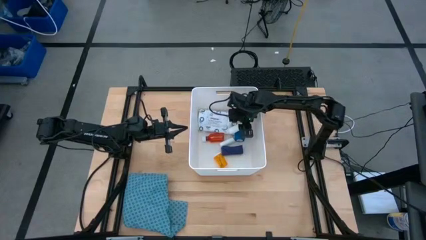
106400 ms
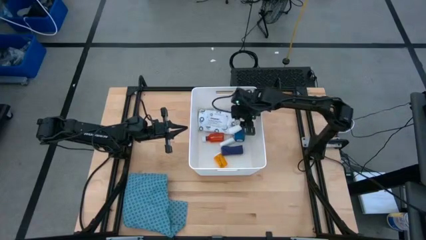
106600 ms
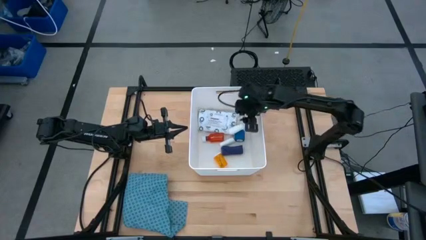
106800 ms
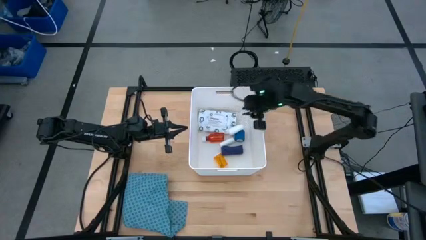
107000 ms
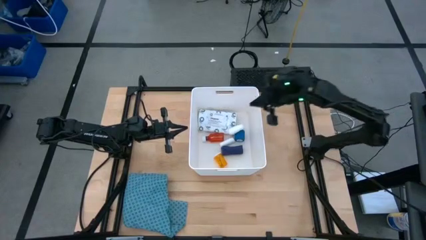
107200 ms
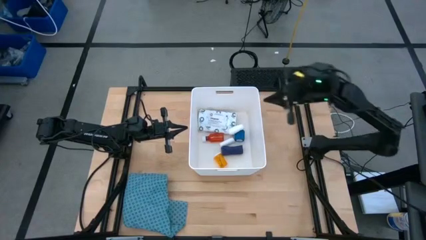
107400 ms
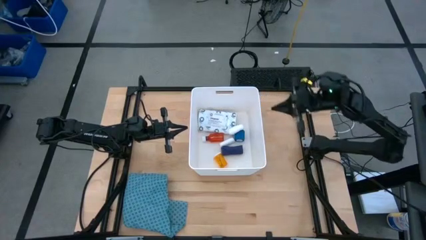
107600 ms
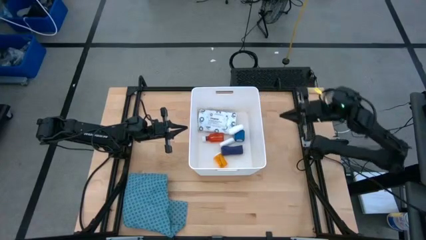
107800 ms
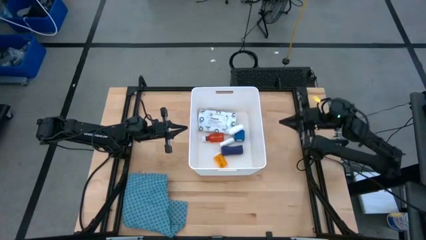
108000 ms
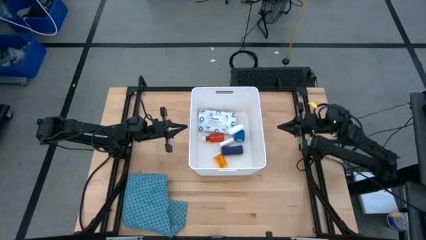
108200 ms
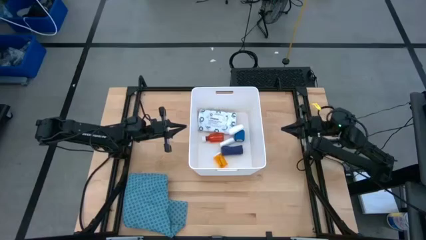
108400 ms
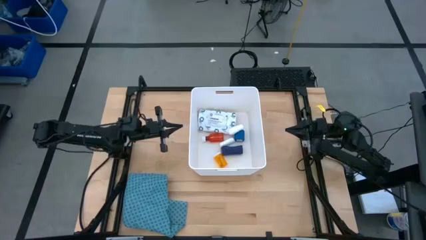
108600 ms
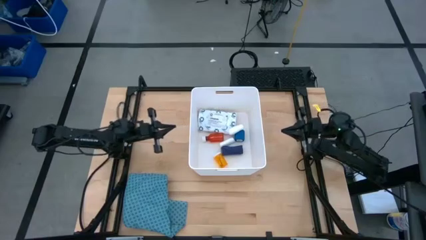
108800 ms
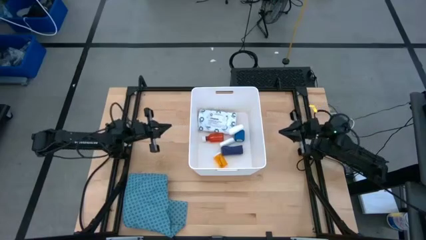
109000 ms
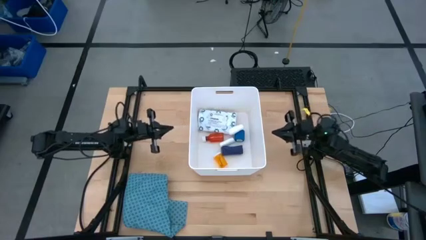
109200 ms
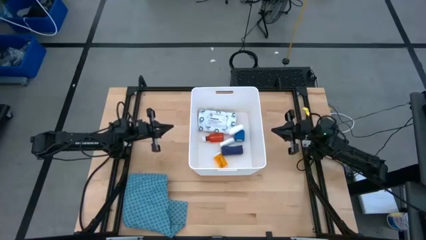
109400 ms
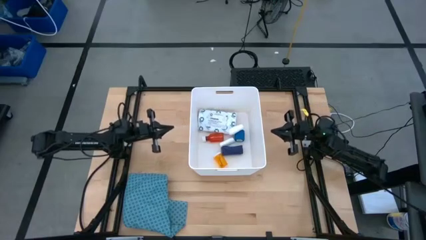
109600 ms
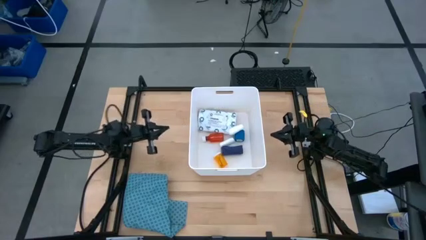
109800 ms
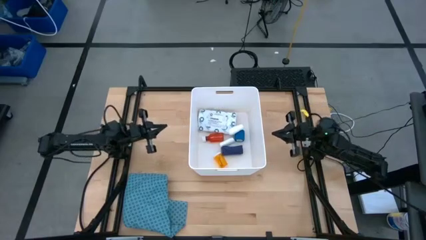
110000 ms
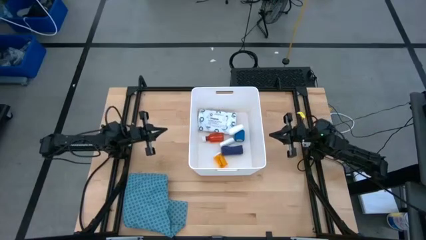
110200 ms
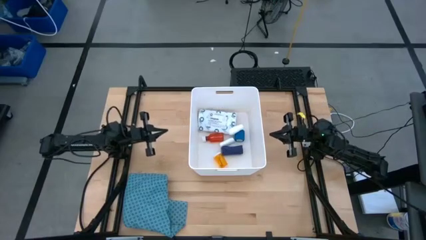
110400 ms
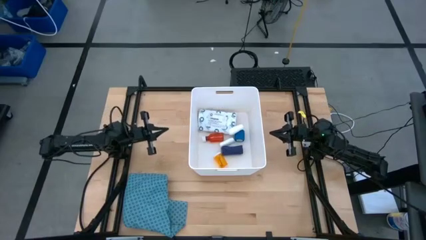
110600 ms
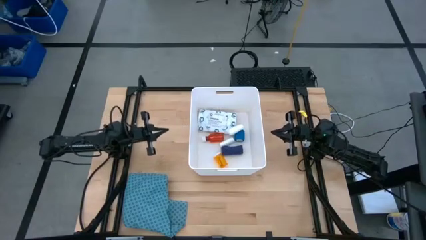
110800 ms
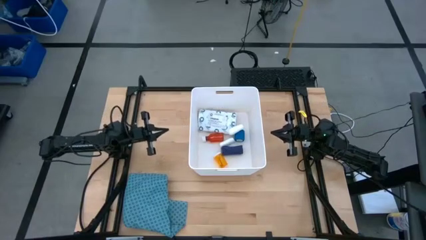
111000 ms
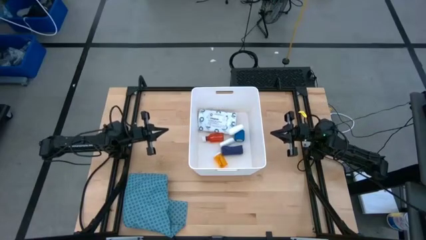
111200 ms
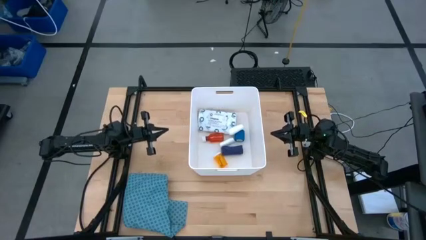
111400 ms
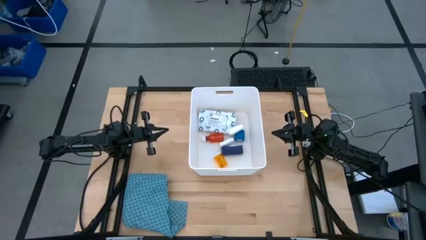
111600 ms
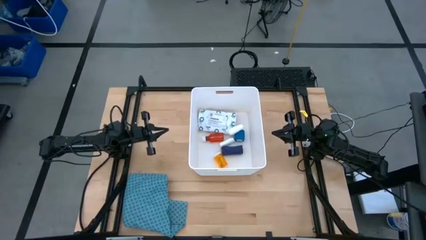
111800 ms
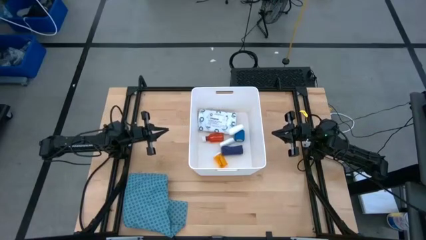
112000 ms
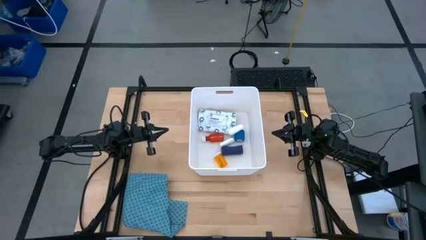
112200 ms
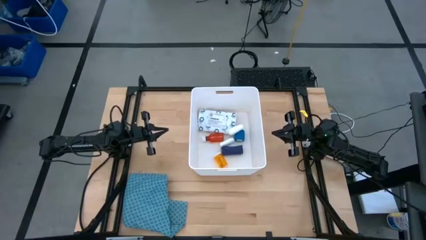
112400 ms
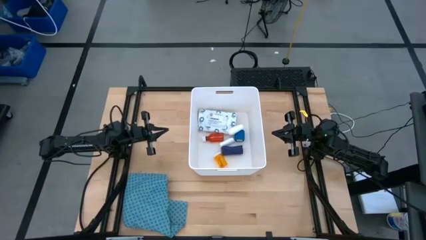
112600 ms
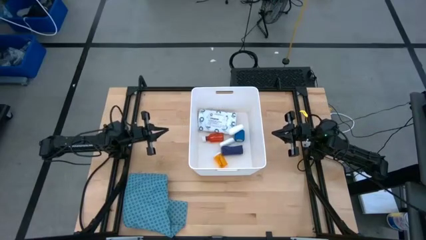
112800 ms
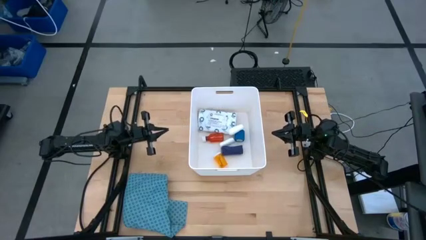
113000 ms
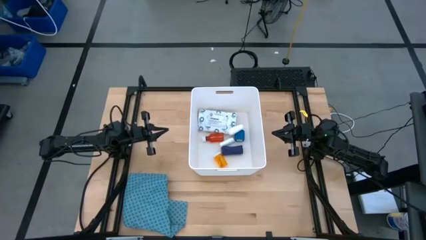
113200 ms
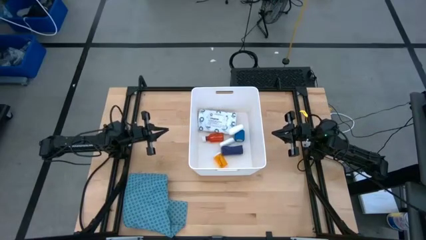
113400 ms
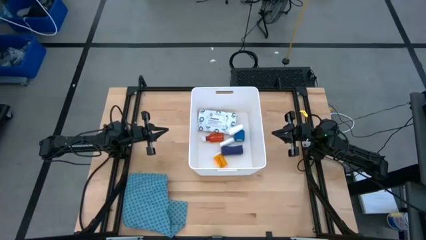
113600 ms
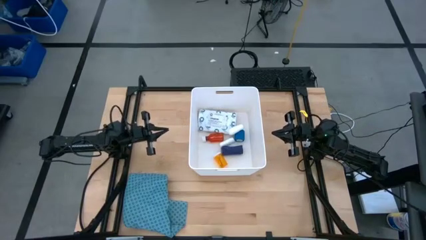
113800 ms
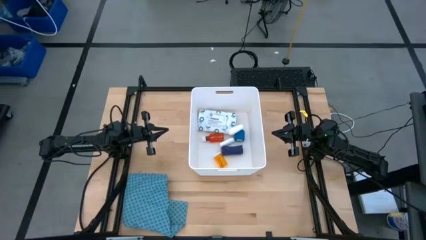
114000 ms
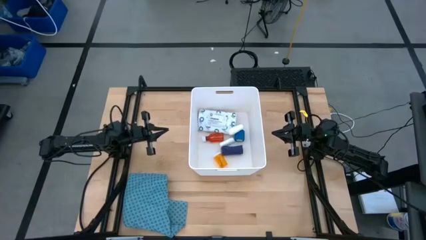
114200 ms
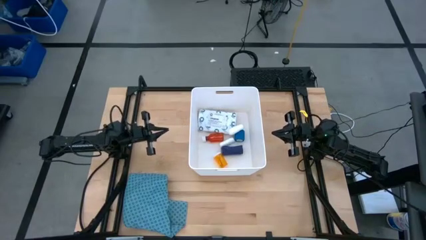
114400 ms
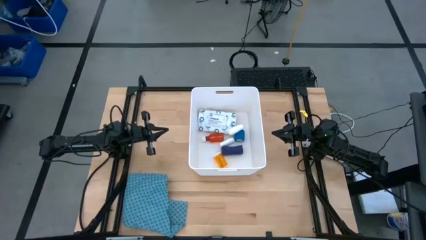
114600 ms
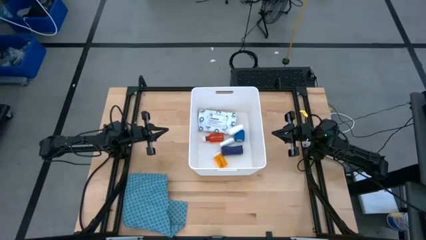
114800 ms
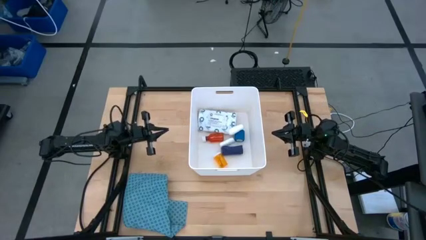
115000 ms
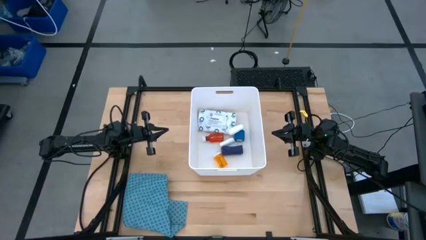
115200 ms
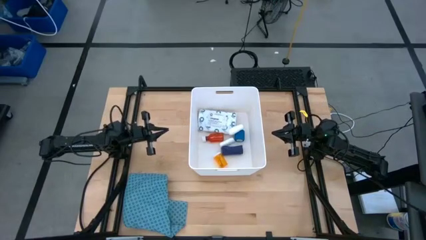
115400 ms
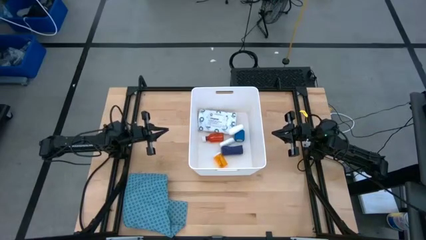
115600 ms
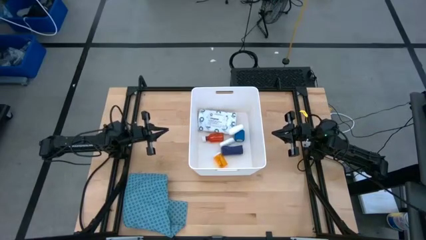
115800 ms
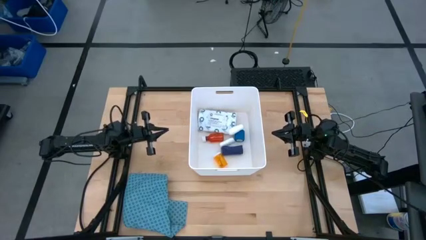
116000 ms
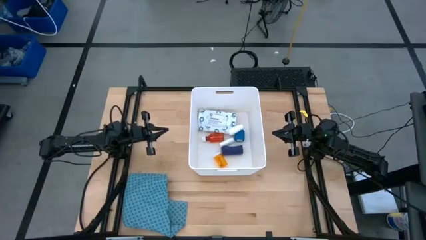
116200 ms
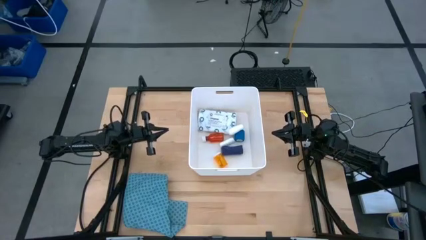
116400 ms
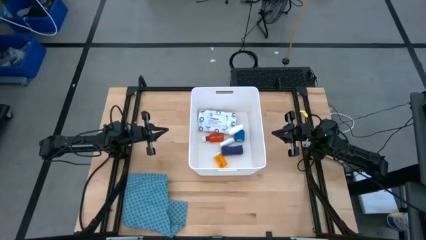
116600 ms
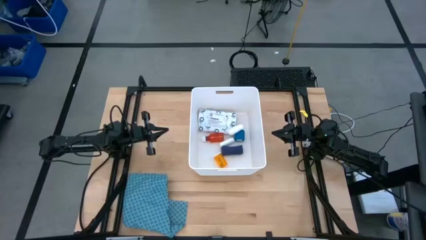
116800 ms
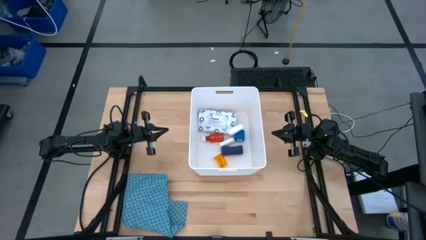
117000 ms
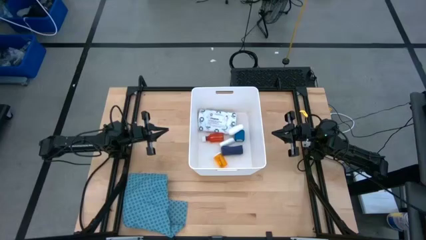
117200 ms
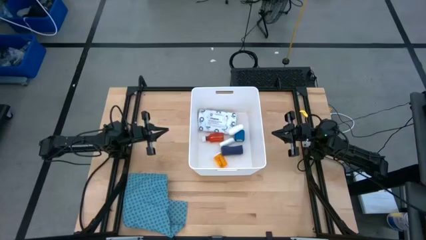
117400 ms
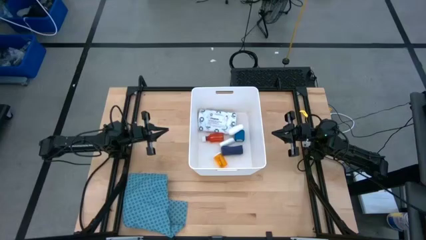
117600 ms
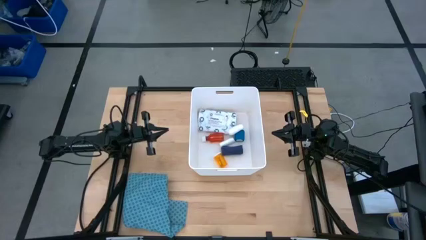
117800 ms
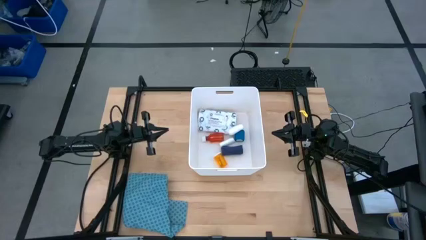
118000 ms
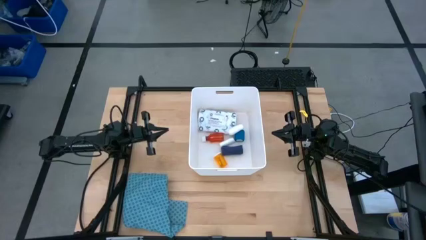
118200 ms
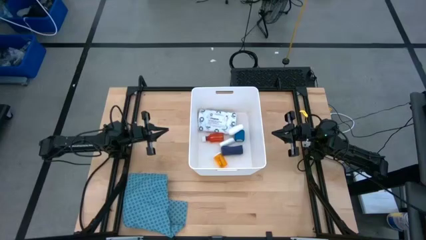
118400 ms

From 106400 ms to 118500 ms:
Task: Pick & place medical supplies in basket/bin
Return to Home Position

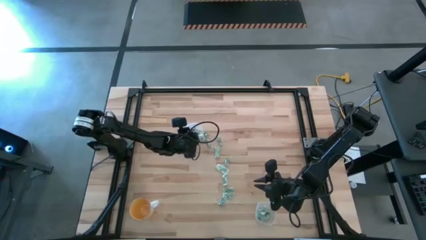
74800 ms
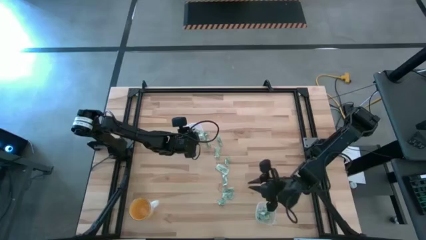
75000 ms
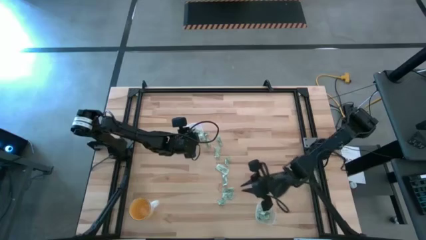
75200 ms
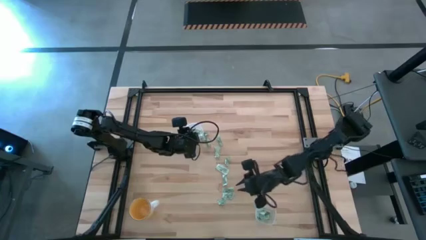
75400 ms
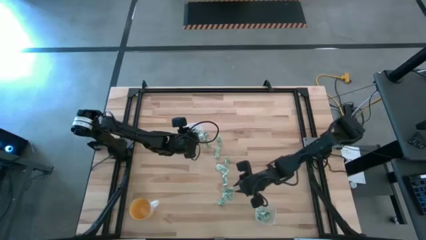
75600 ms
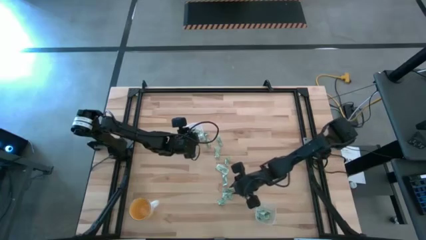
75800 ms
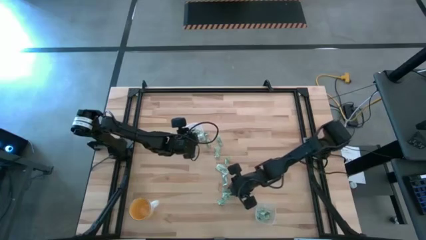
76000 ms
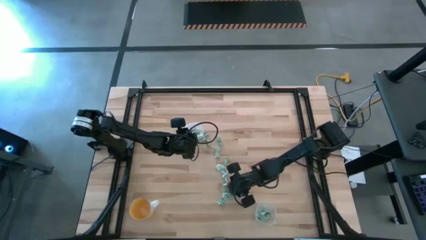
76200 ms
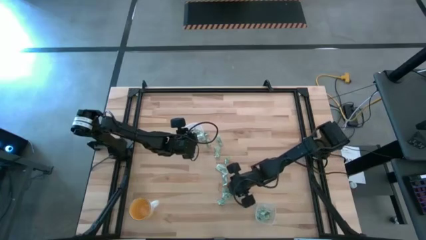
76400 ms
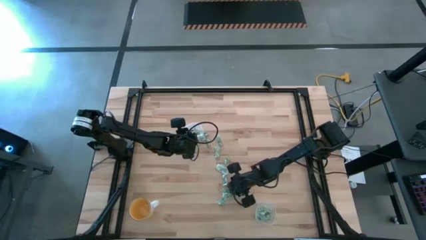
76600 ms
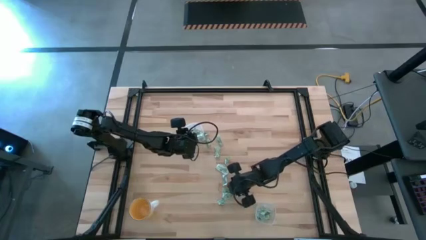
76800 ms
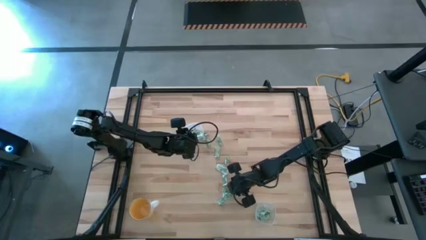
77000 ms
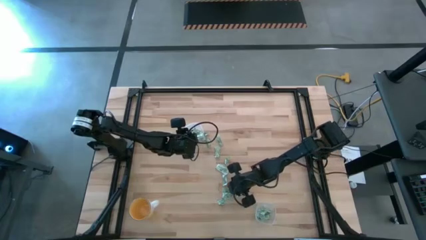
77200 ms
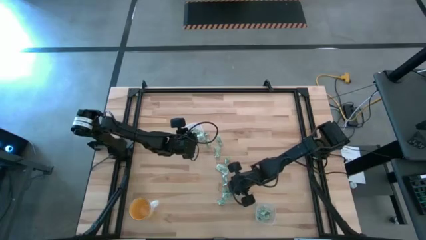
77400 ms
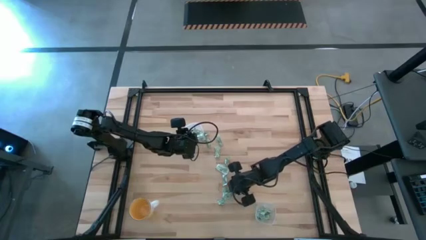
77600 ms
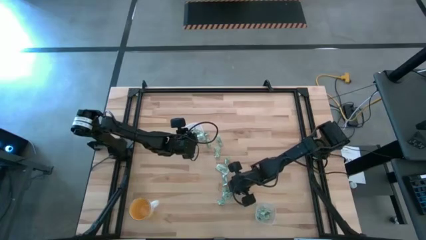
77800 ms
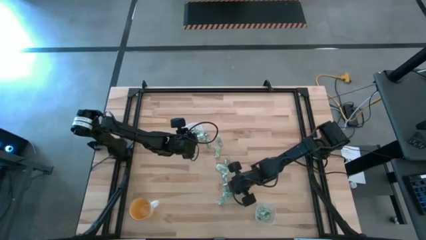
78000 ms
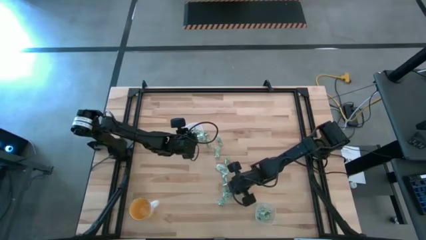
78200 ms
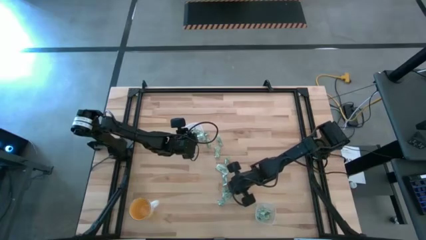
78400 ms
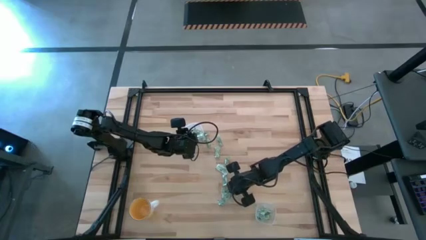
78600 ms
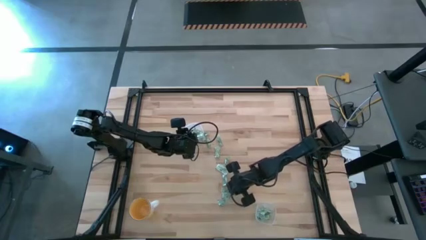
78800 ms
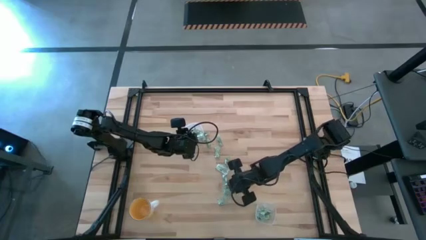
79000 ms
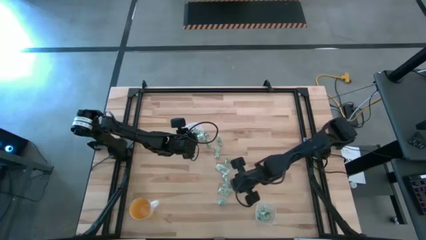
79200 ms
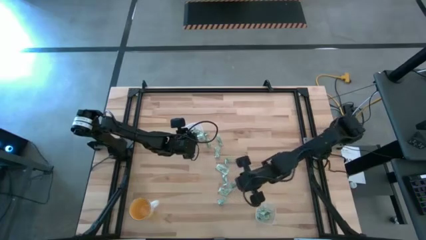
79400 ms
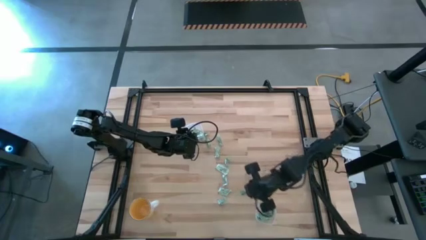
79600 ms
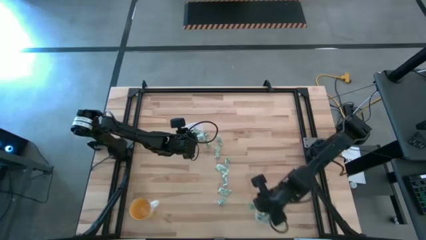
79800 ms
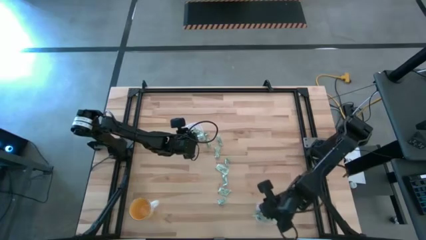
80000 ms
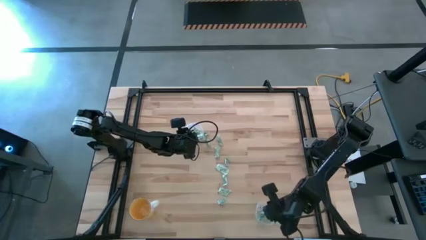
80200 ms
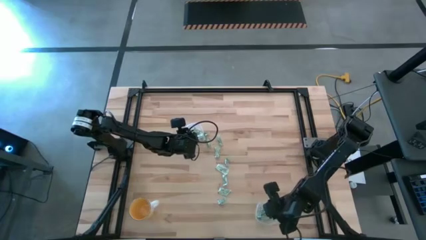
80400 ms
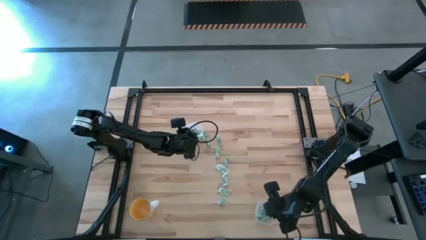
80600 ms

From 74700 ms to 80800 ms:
Task: Pick and place Stevia / Truvia into bins
Put the stevia packet into the bottom transparent container
